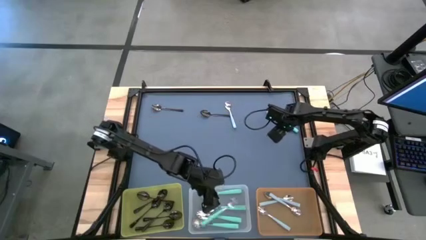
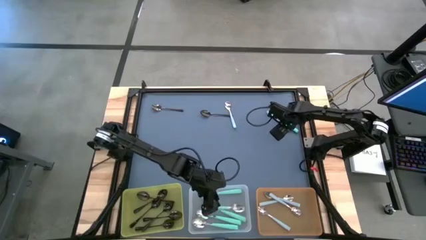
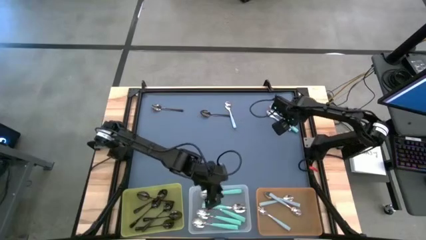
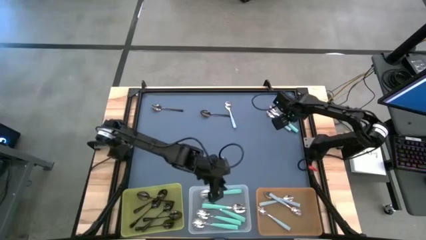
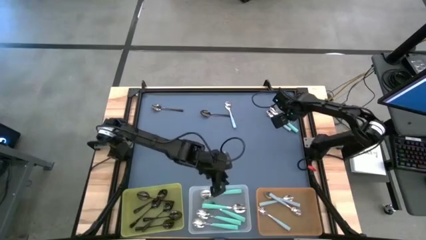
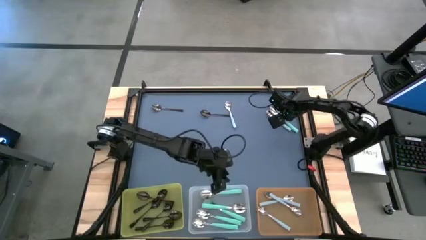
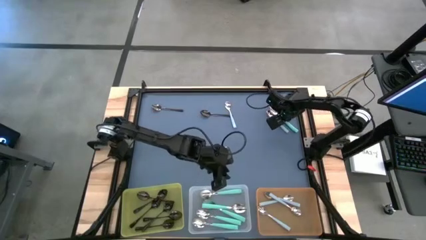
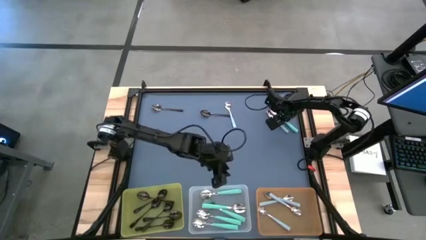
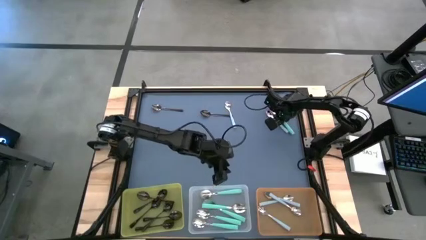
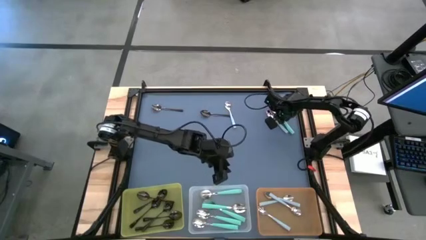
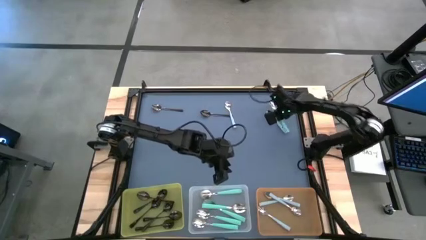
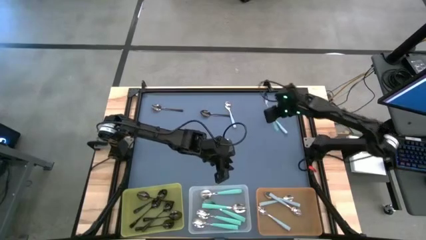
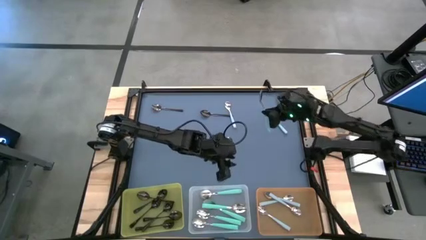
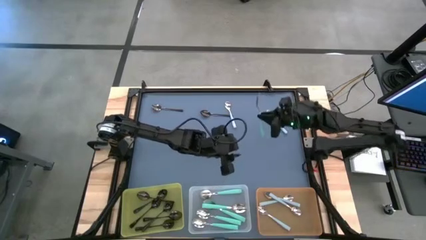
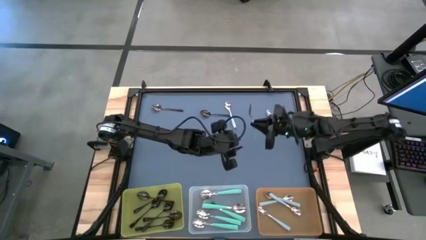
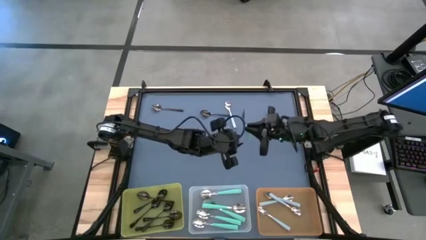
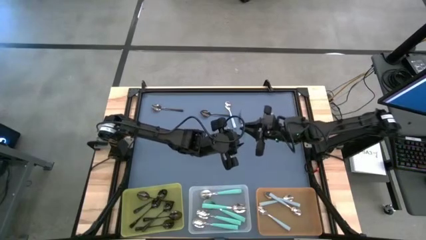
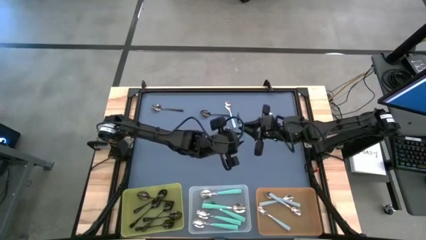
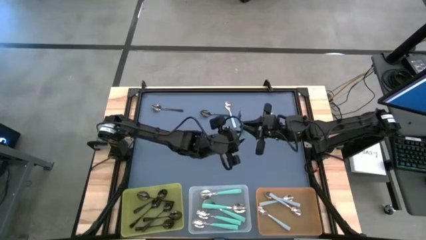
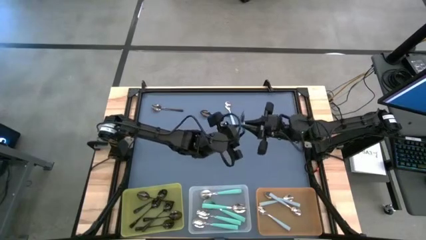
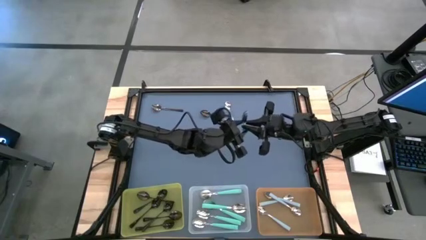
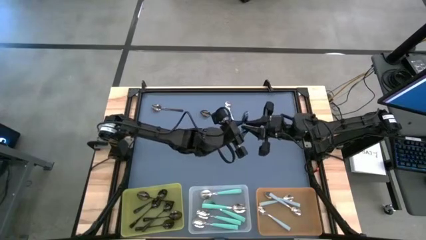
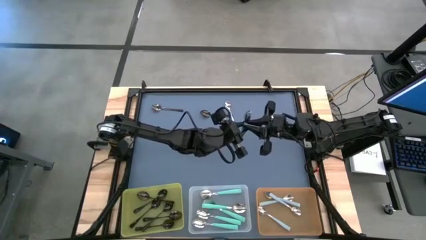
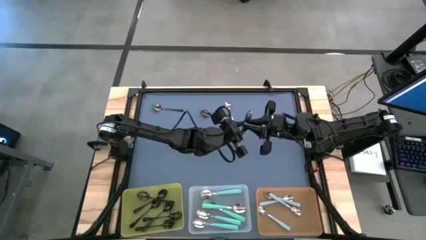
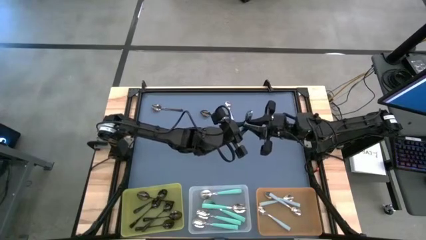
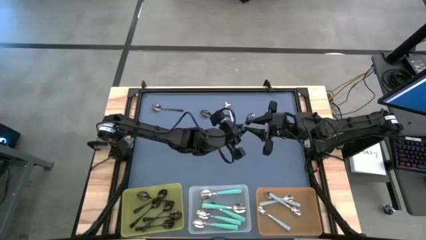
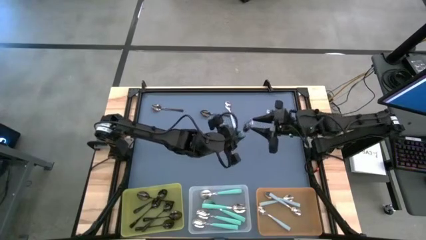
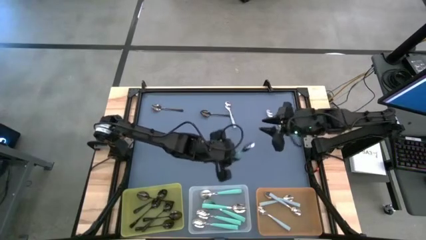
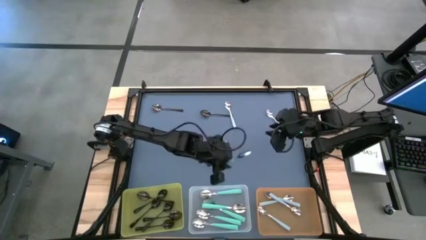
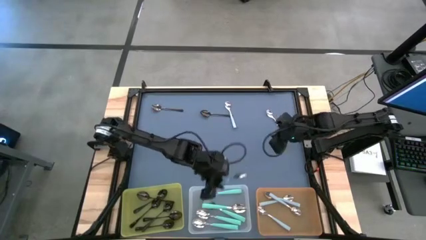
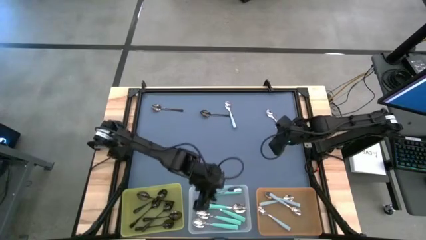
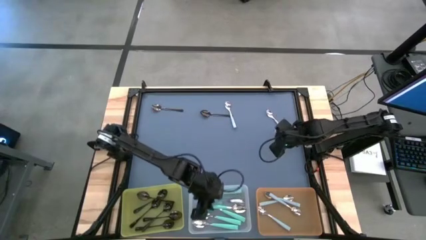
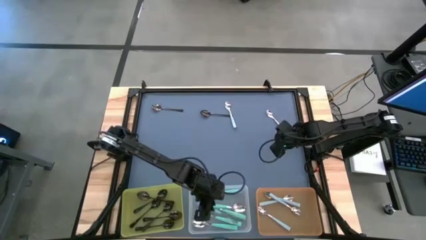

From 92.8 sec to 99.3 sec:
Task: Sort silverware by color (type)
Put the green spoon into the transparent bin

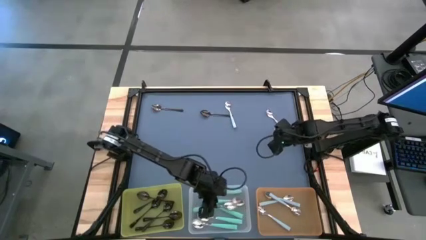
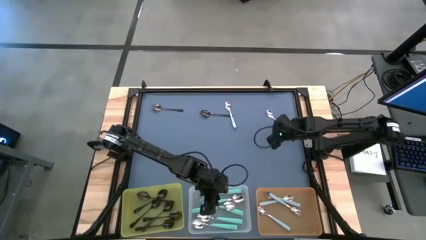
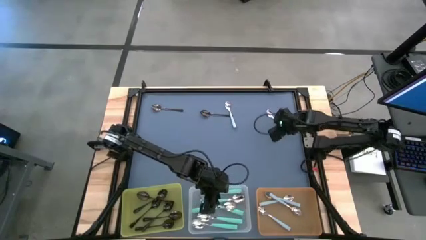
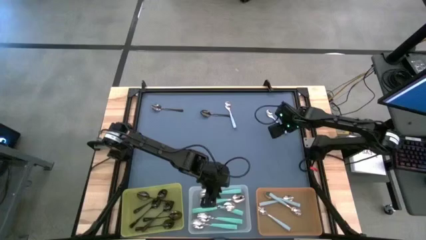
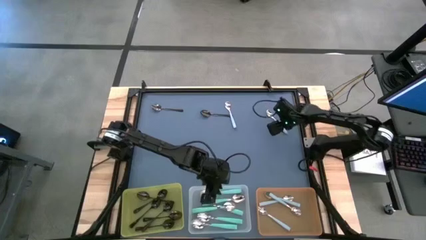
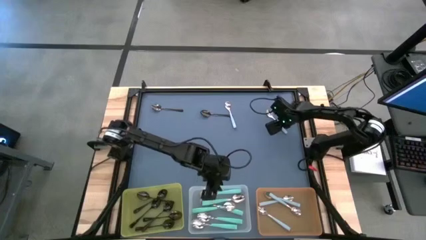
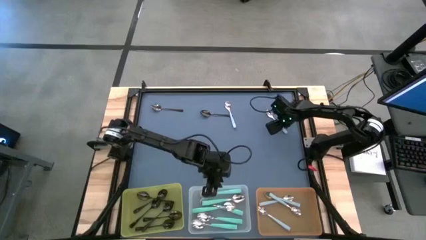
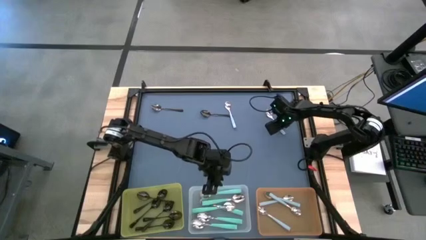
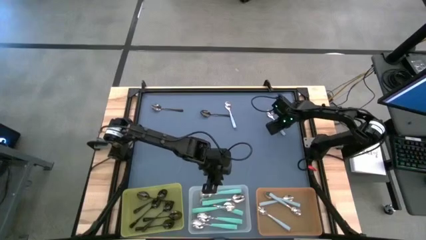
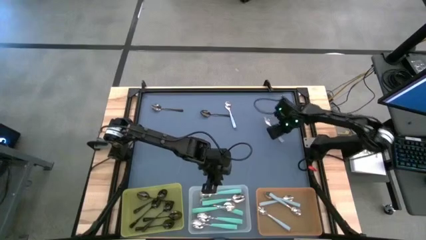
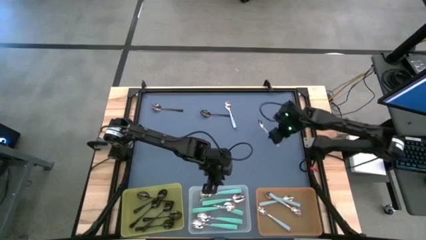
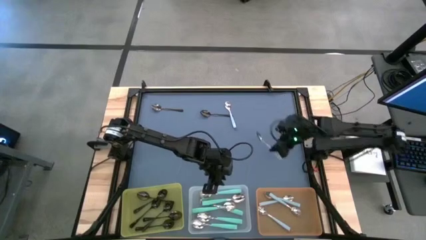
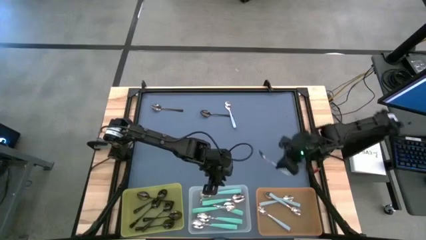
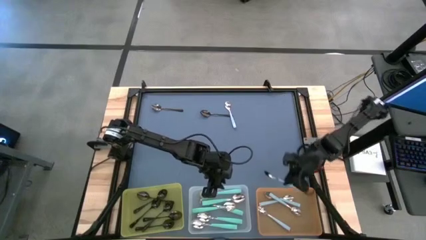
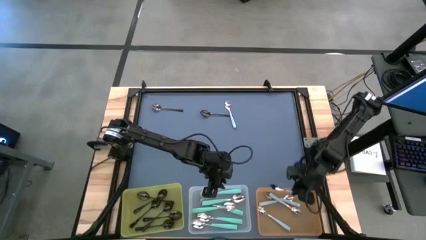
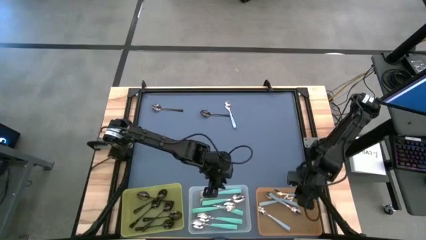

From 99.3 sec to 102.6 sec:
Put the blue spoon into the orange bin

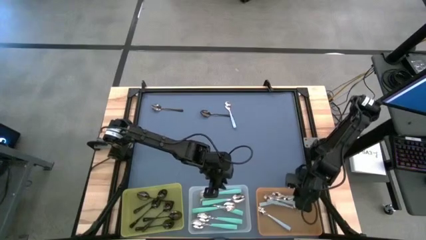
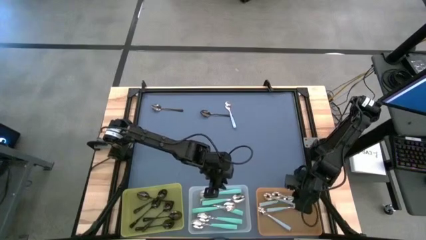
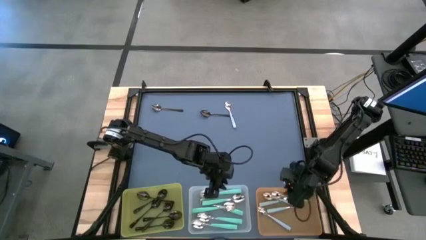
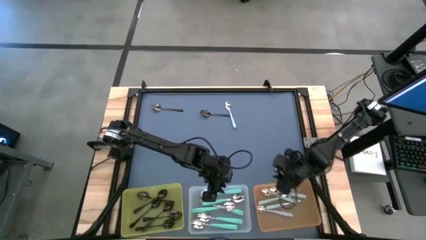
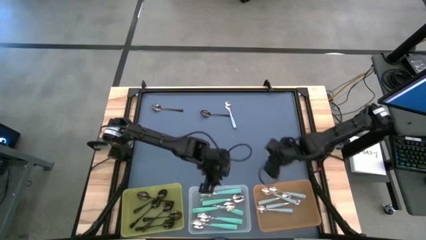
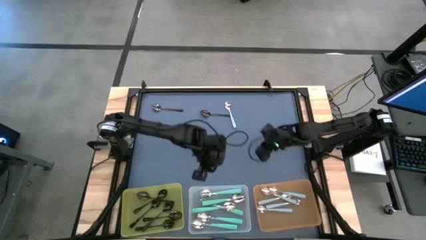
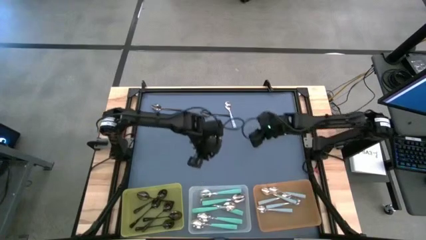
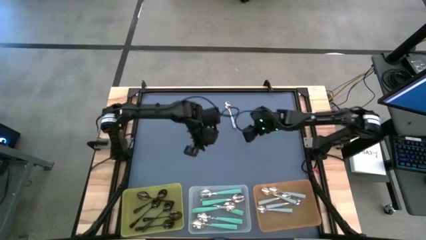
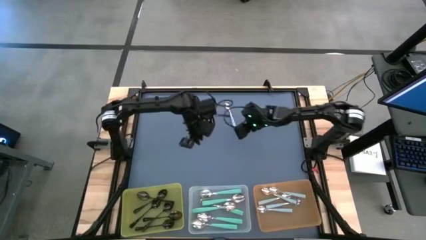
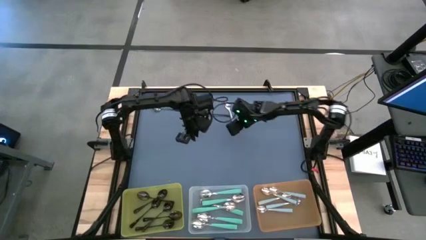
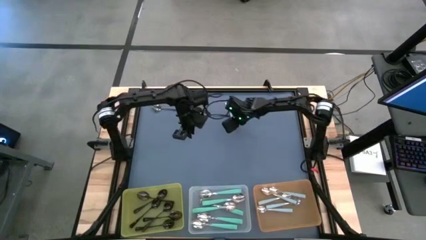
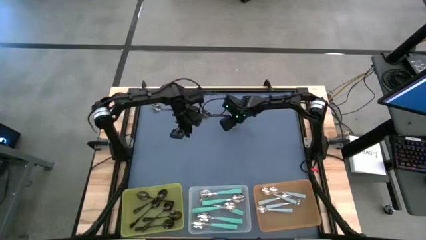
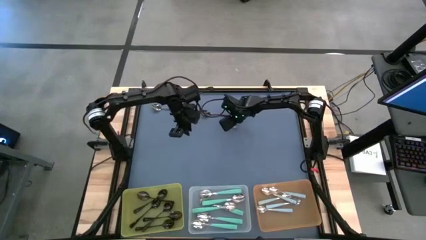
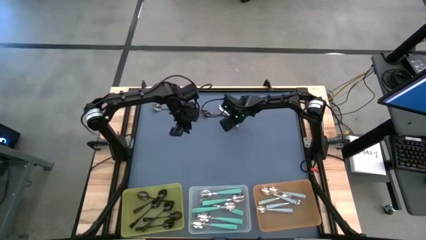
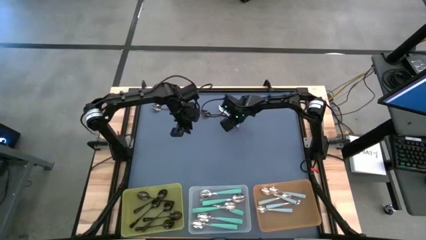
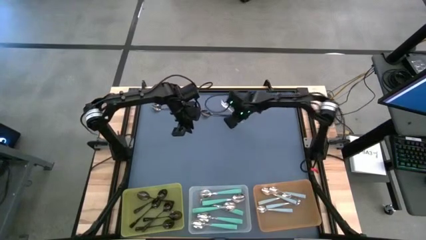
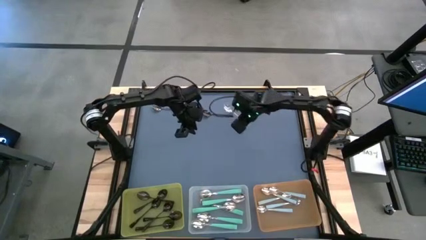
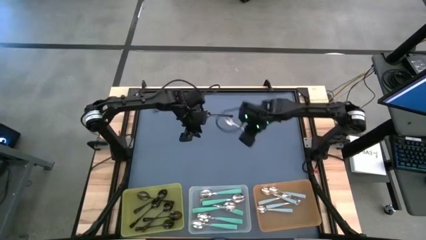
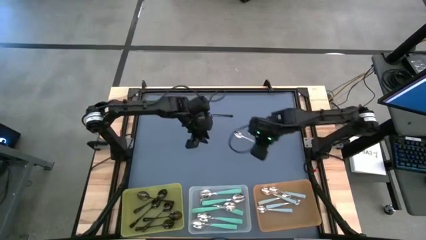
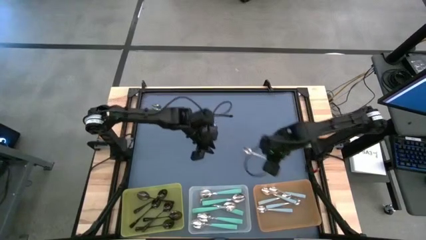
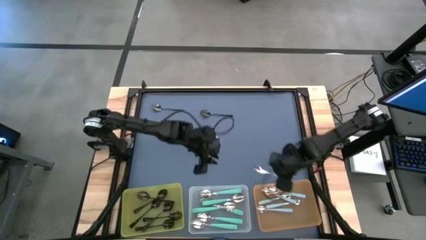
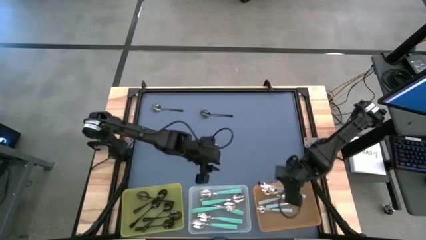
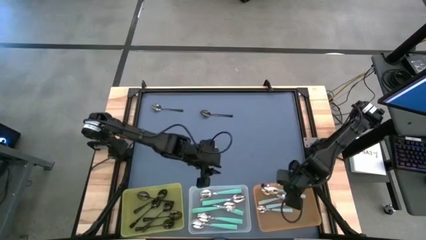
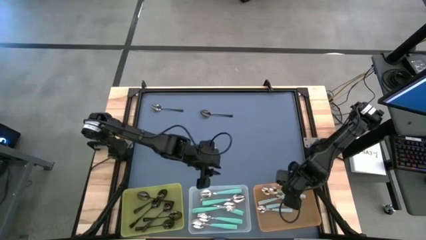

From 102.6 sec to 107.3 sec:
Put the blue spoon into the orange bin

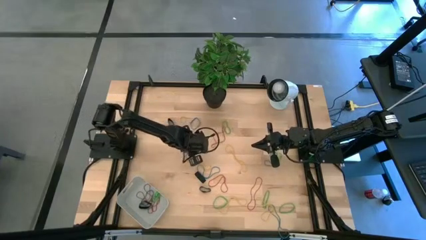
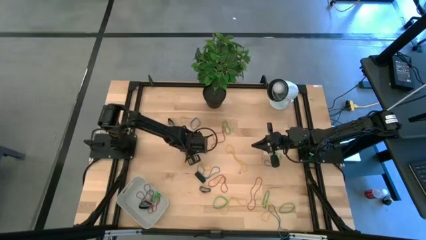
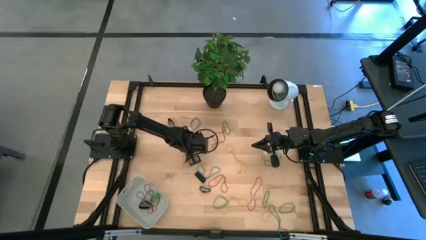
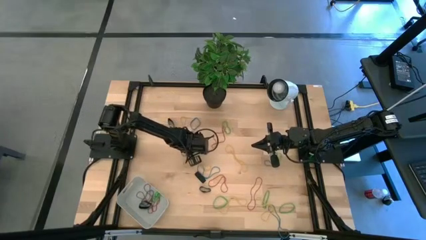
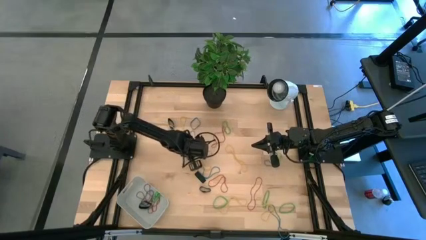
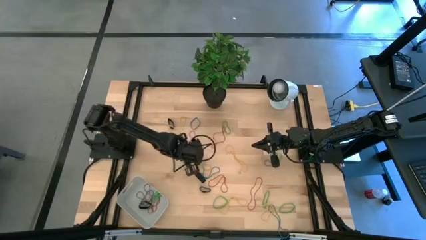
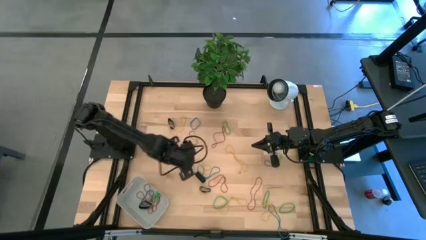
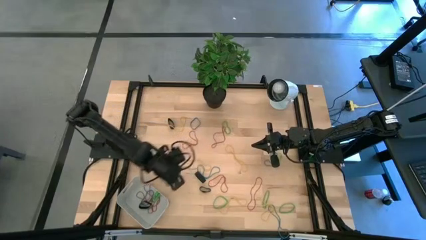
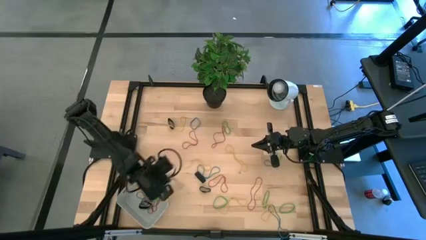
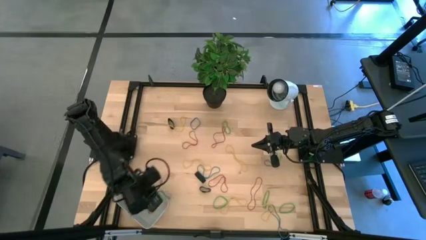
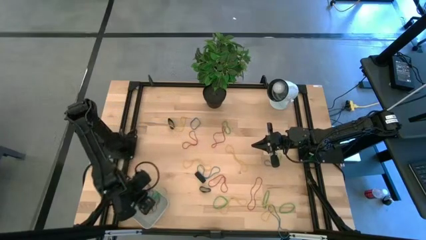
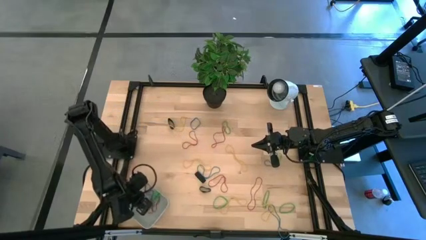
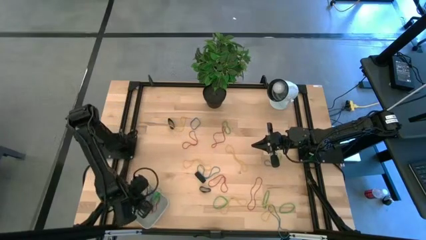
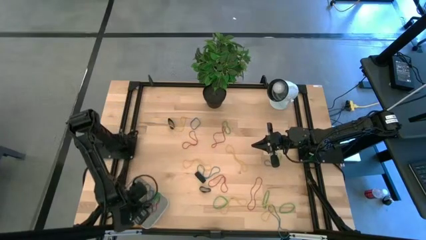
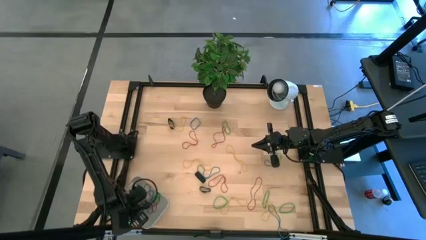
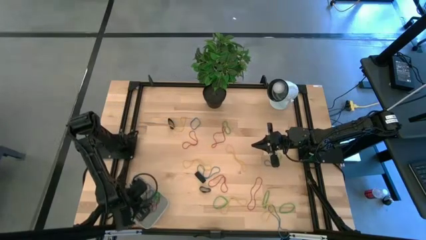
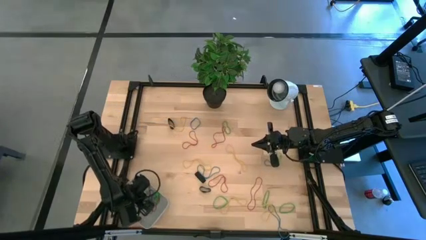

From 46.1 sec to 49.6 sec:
Task: Pick and place rubber bands into bin
Put the blue rubber band into the gray bin
